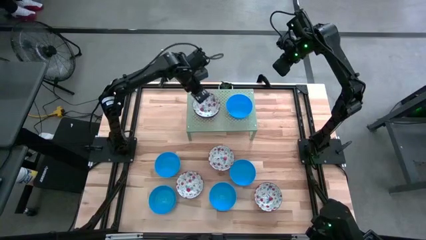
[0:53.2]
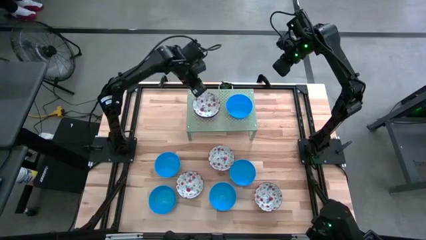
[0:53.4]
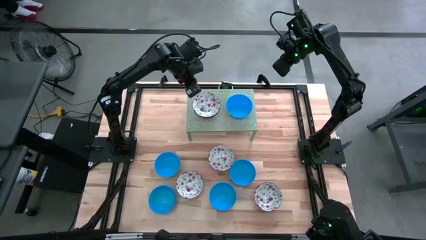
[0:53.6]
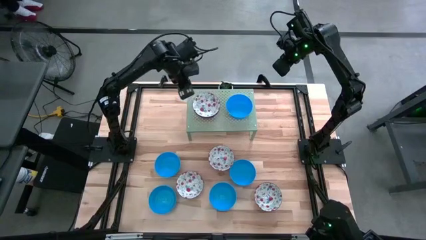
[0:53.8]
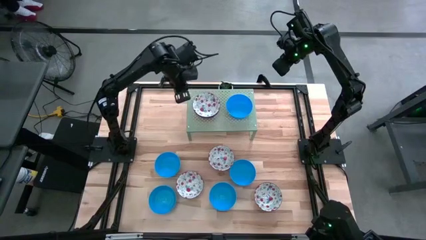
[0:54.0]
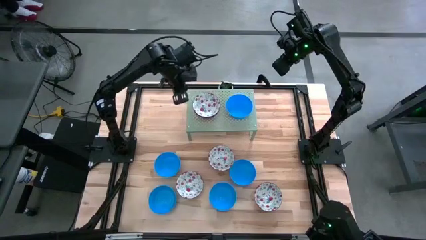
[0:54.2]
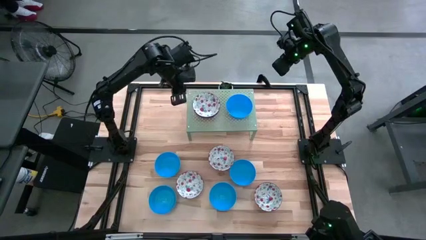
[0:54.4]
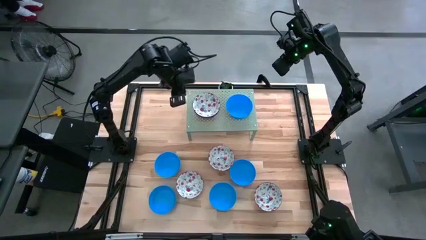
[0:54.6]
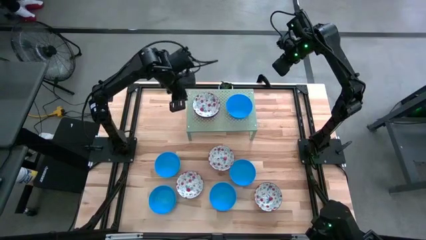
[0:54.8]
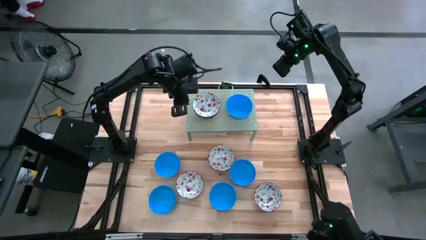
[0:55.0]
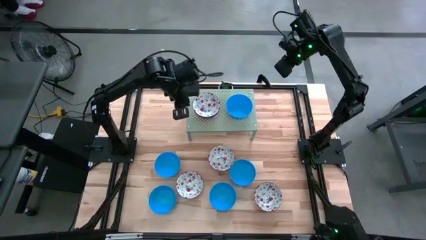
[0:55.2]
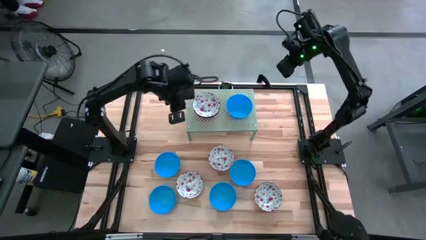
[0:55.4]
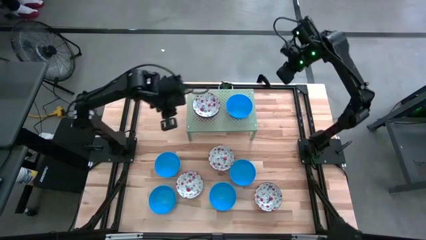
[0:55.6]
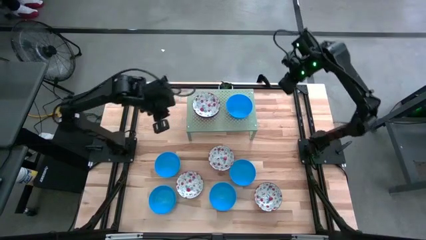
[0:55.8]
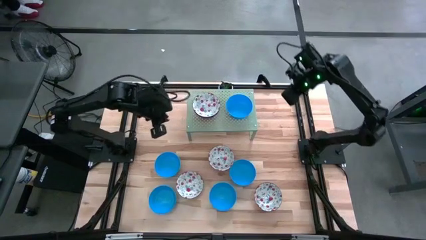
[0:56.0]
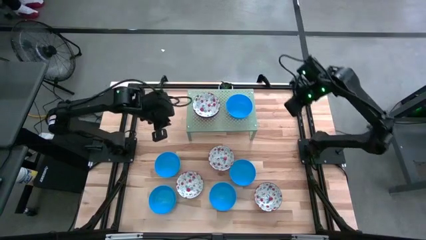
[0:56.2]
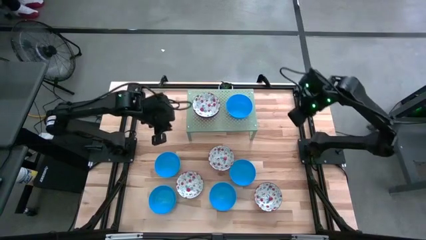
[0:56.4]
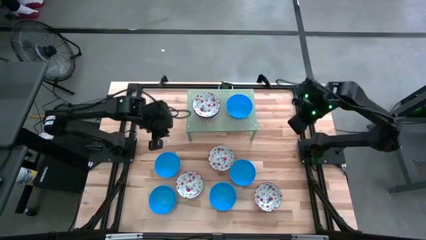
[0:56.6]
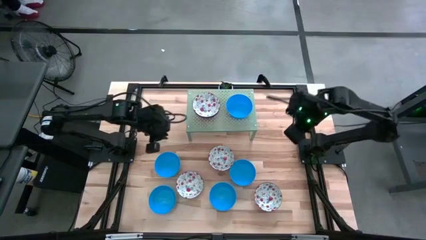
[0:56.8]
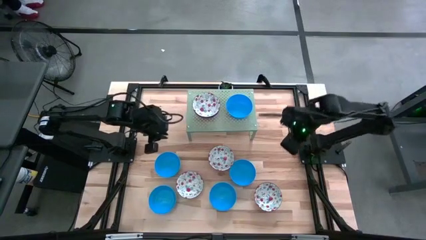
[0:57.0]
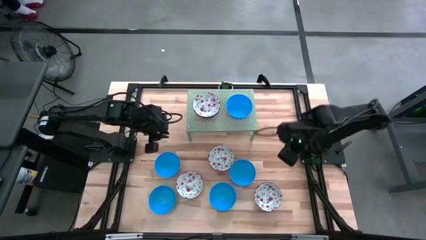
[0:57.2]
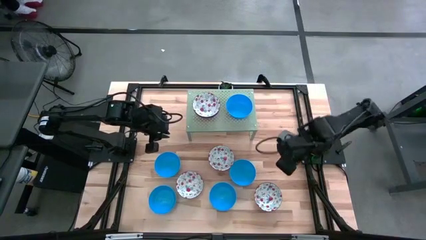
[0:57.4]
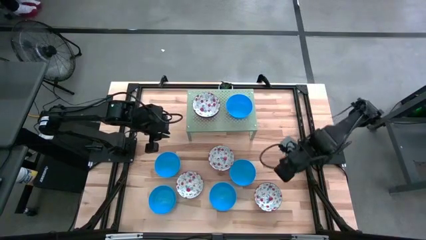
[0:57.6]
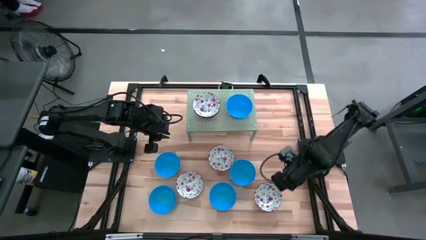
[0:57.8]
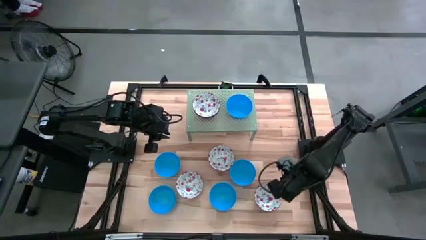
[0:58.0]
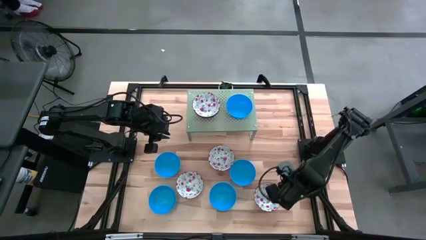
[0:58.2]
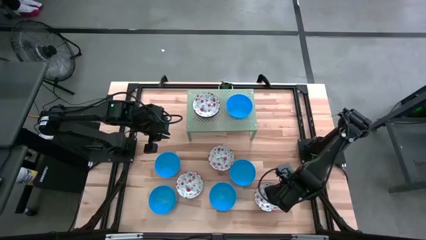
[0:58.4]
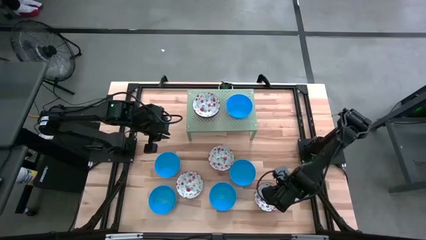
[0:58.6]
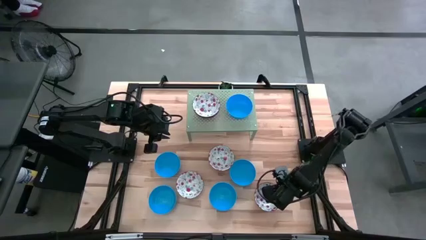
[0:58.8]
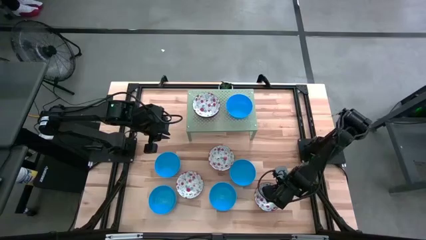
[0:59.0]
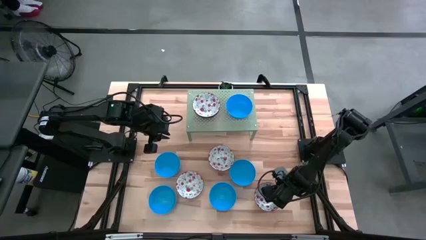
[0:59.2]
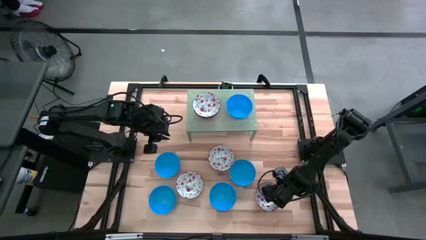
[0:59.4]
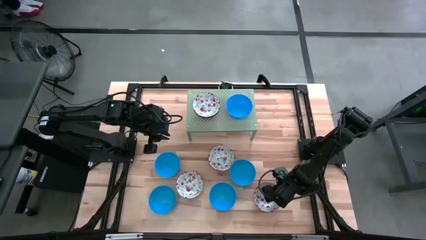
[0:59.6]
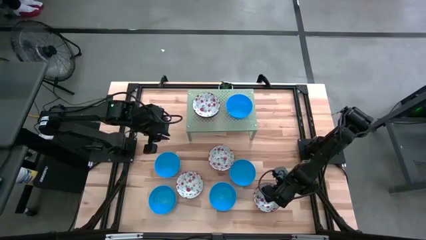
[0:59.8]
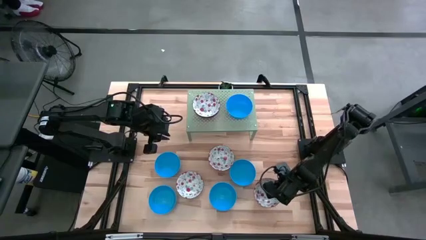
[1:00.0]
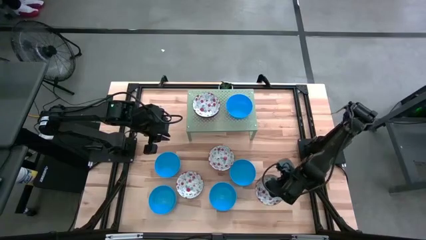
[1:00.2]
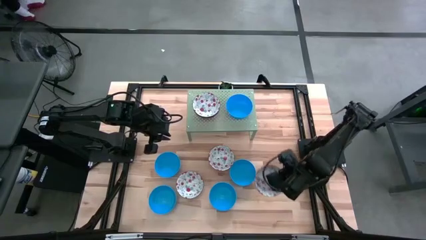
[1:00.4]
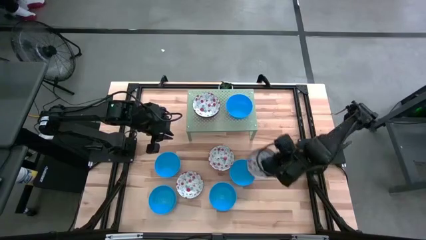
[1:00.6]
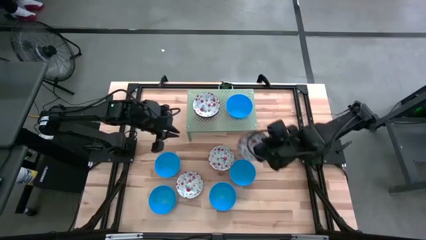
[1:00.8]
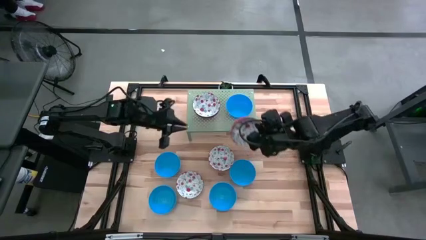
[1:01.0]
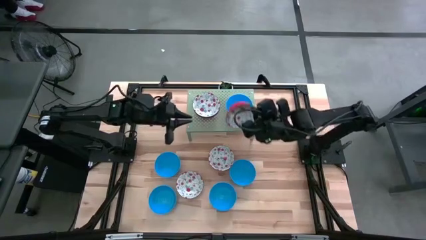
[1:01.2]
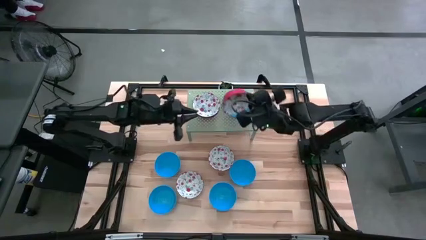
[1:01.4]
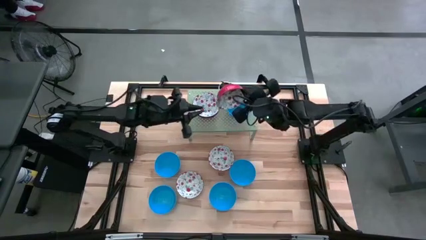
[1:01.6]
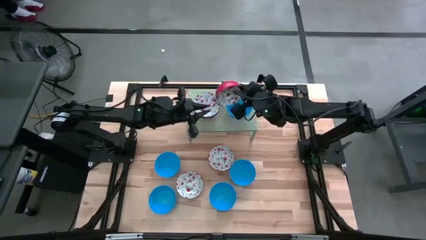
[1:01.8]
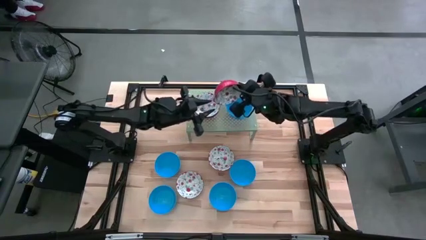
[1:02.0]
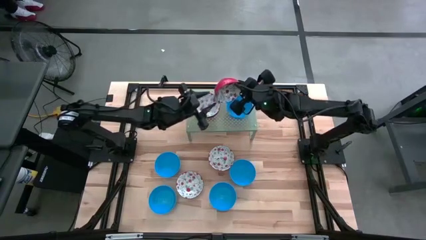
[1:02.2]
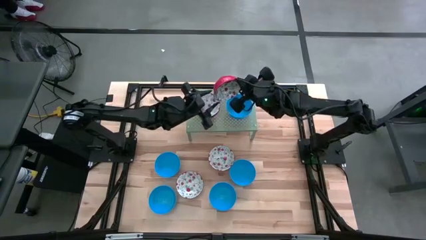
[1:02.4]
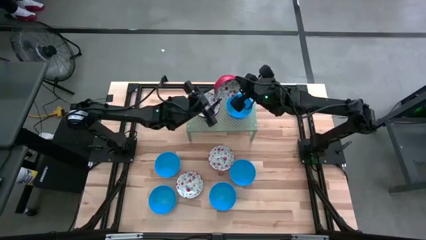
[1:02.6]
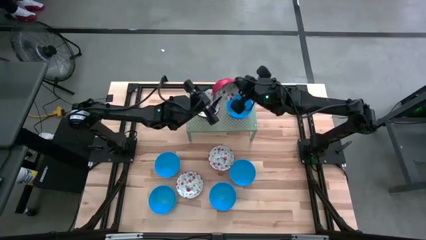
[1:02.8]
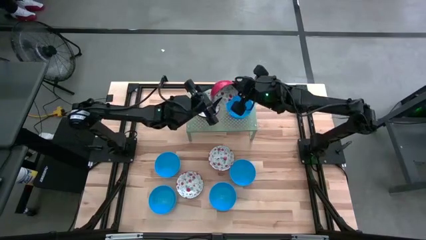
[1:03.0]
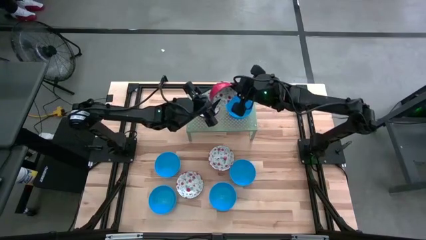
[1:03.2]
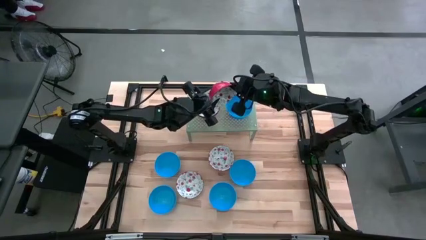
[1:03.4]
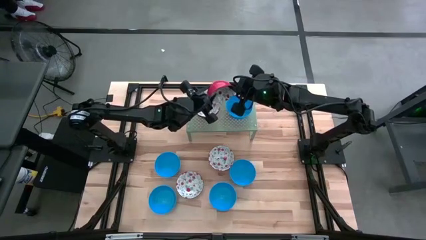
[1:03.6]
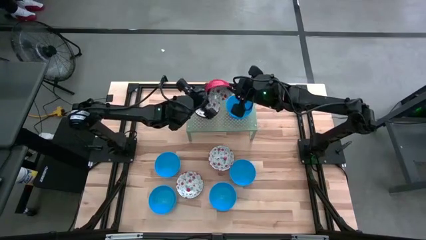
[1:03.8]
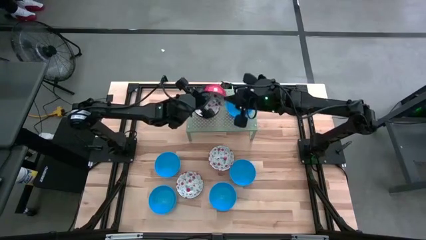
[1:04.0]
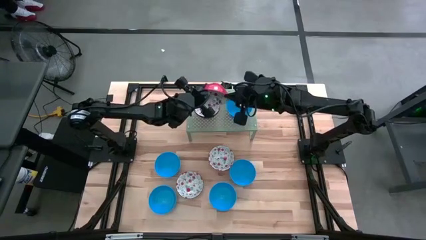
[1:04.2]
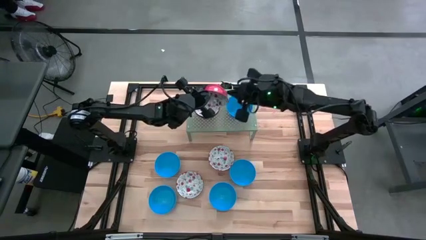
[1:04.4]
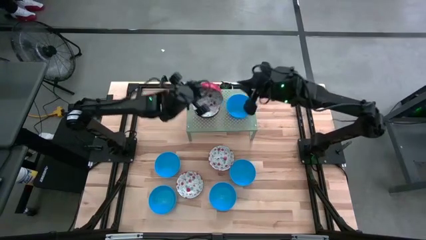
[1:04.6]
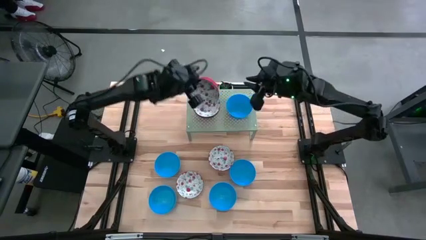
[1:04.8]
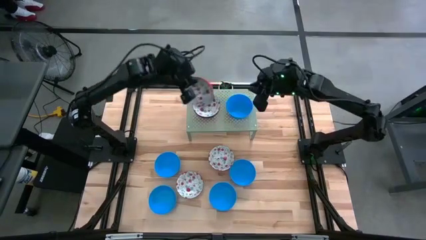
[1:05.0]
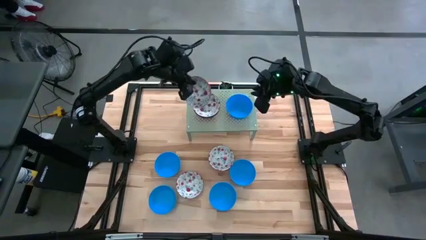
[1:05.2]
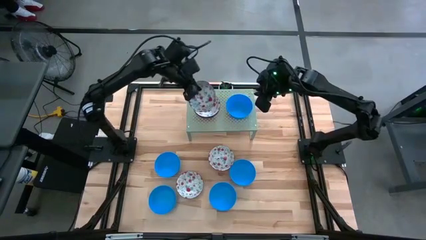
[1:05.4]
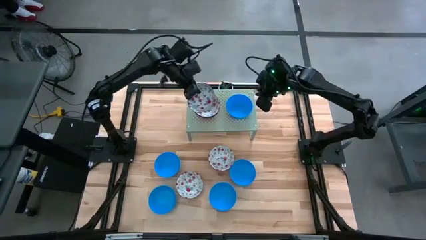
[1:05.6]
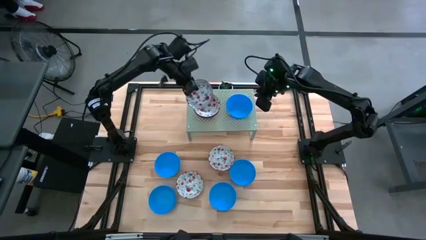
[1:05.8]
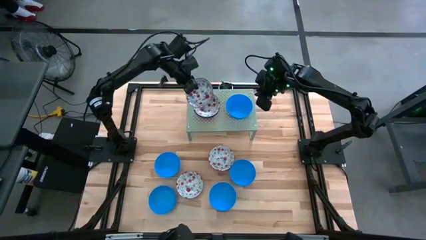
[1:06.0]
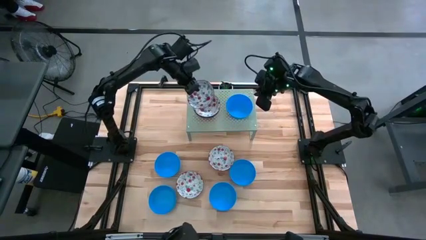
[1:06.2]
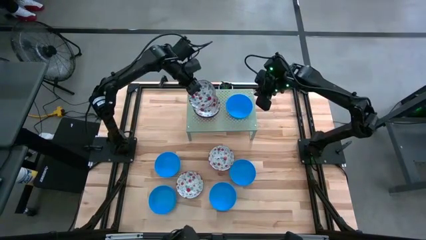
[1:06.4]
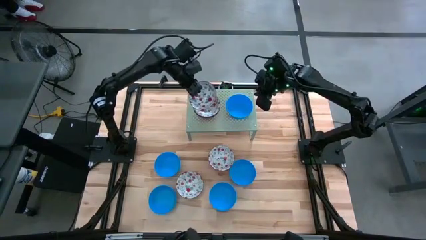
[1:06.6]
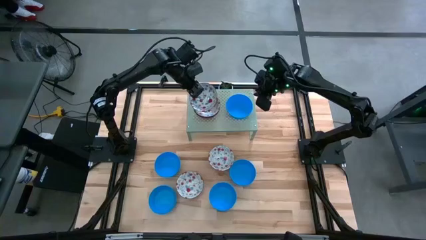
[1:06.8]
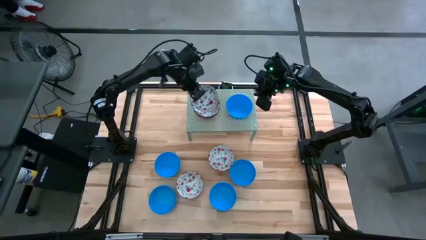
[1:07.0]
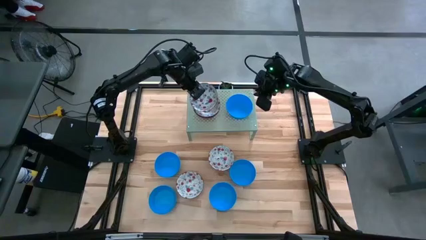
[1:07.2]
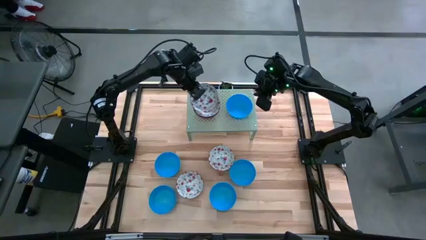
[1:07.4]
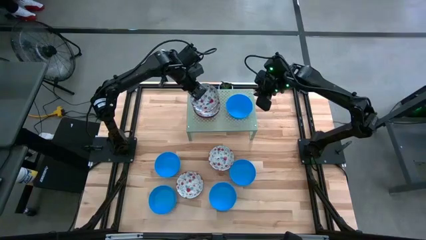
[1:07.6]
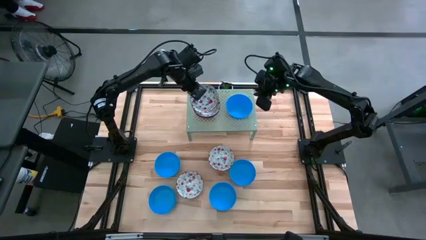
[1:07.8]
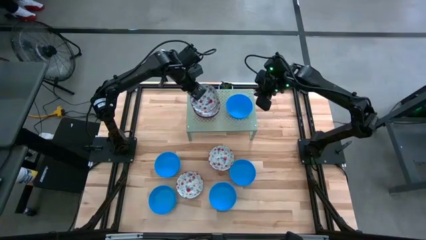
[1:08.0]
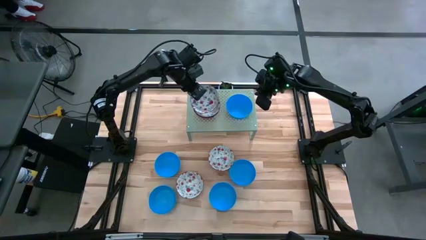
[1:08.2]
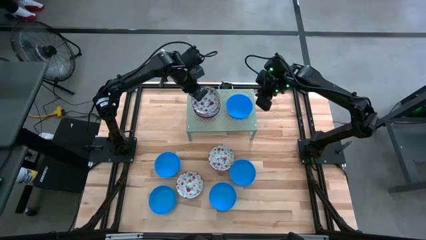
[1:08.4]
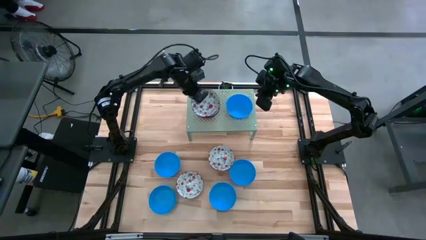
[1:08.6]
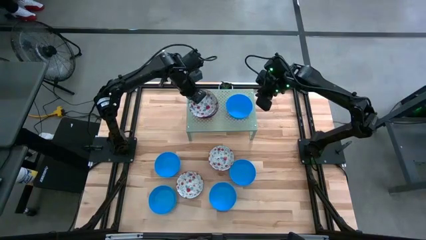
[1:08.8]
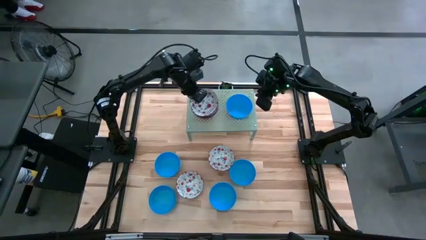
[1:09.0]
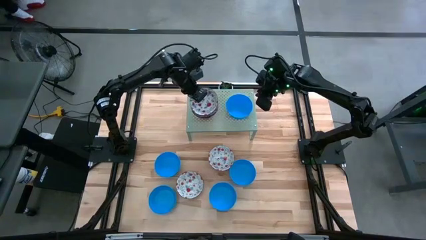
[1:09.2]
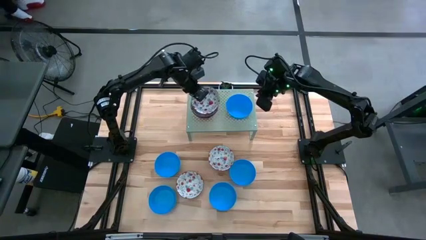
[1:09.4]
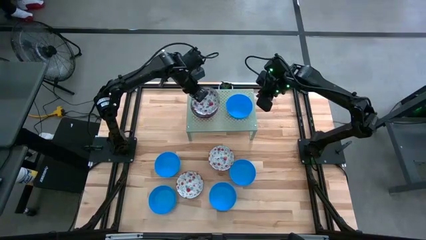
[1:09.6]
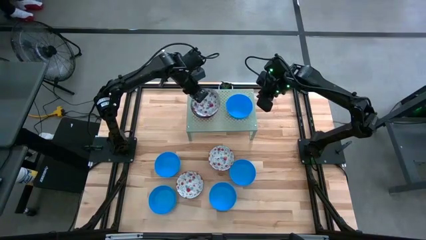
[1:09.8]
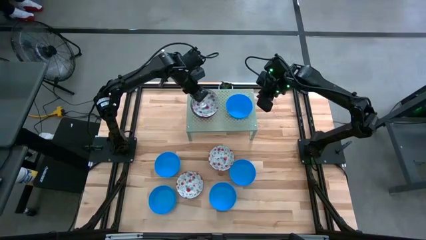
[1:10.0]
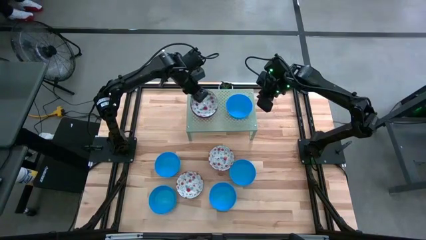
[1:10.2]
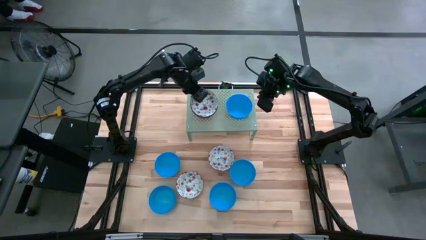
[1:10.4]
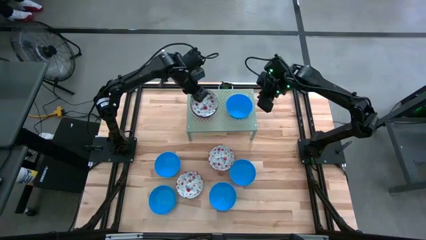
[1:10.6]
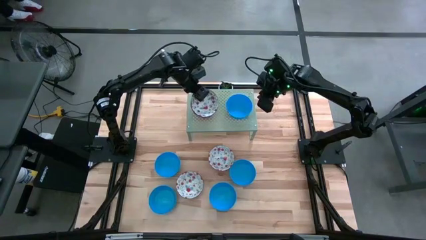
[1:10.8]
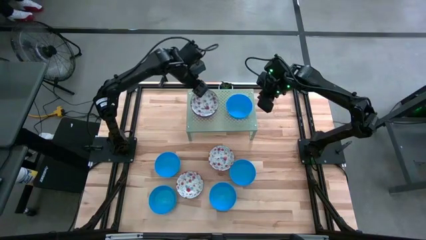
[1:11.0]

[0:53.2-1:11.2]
Task: Pick & Place Mini bowls
Stack the patterned red bowl on the patterned red bowl on the shelf
